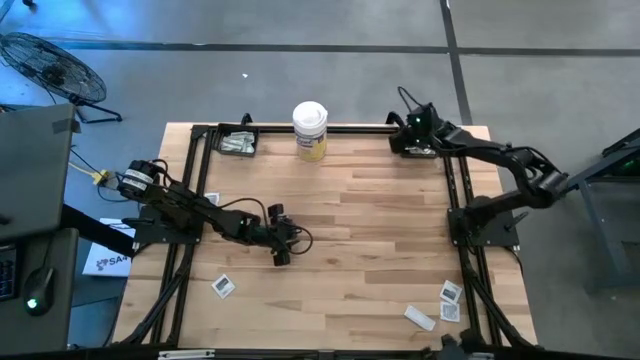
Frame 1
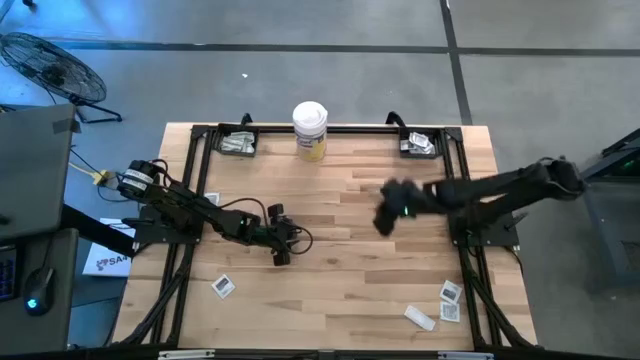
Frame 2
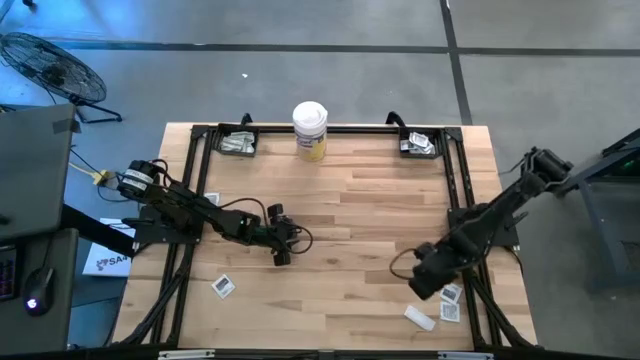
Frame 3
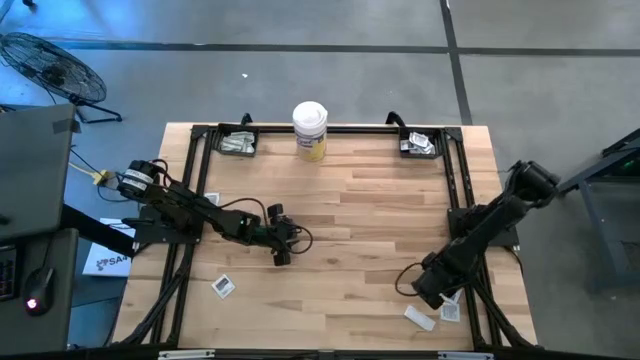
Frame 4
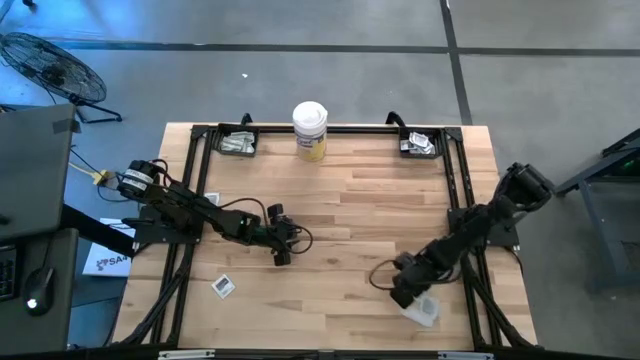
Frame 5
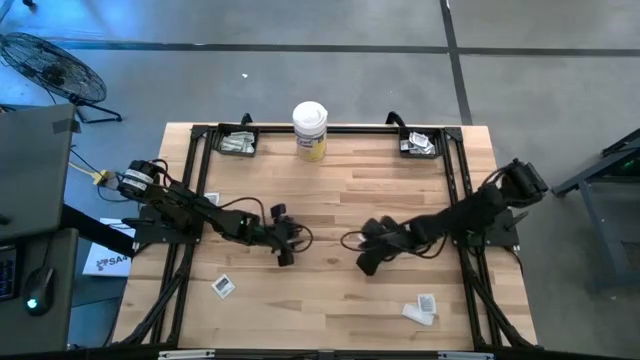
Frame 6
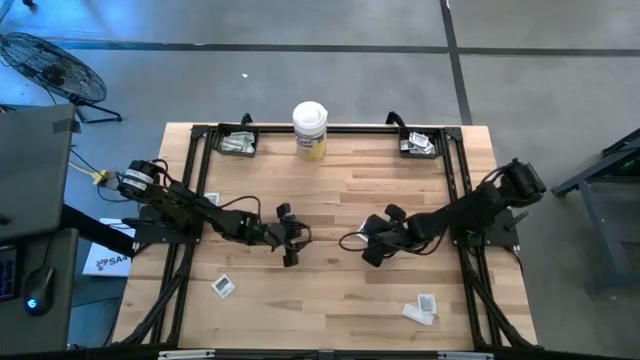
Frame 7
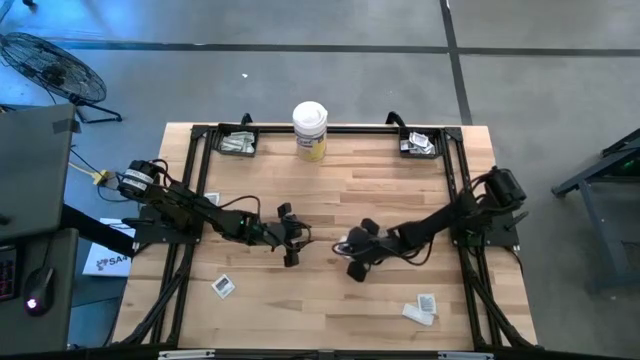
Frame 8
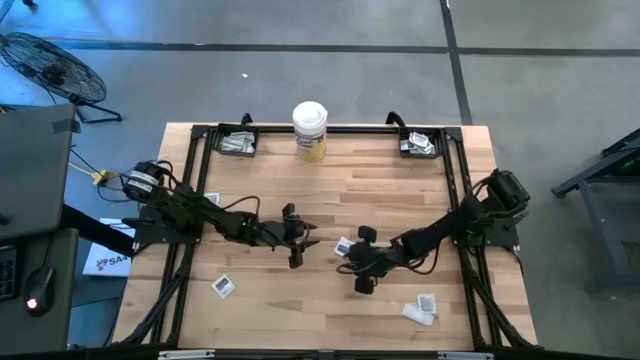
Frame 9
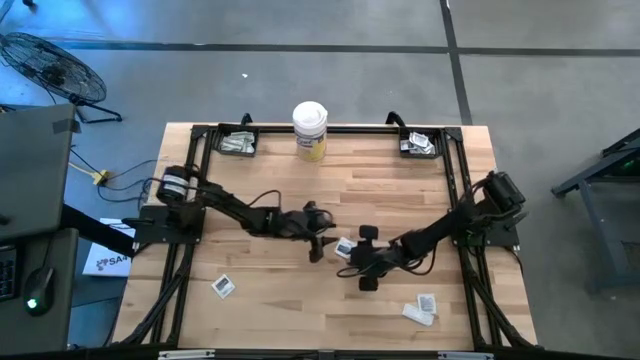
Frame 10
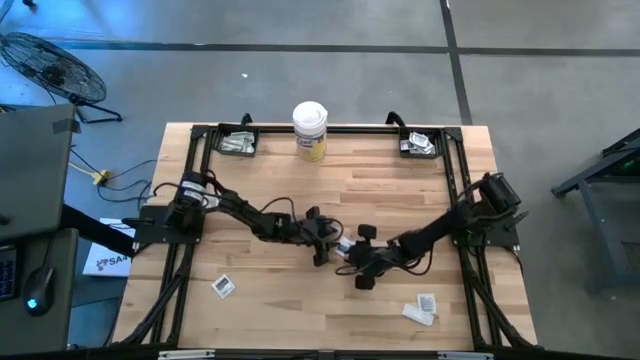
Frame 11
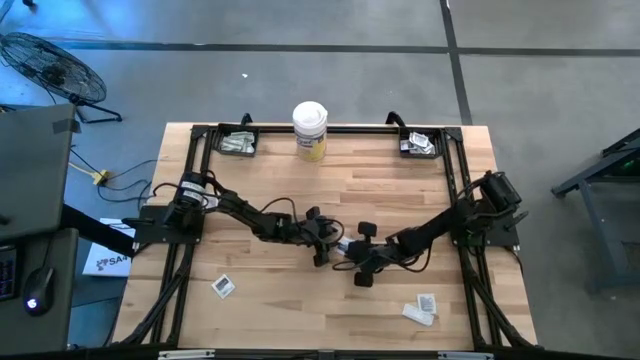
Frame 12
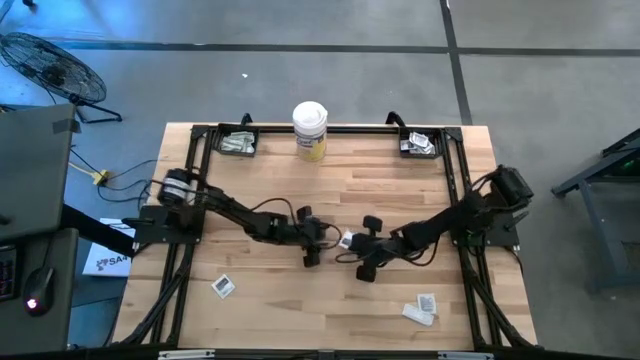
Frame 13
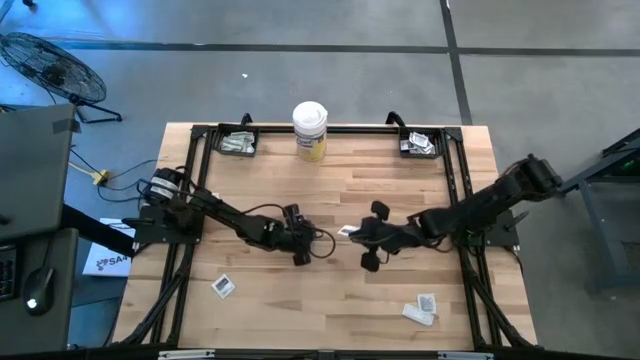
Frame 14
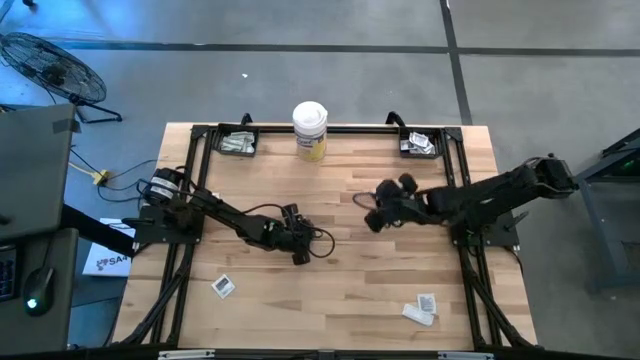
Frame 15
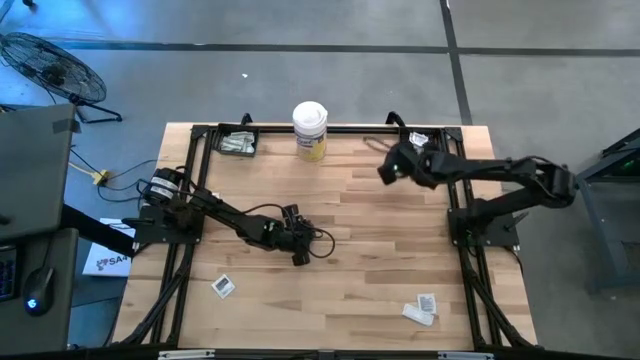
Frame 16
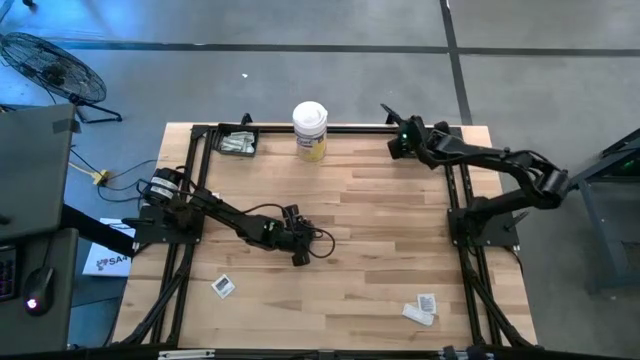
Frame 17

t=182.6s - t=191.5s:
Task: Pick & Place First Aid Supplies
Put the black towelette pack into the right black basket

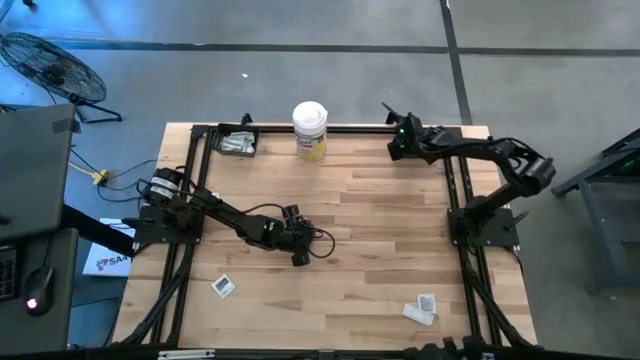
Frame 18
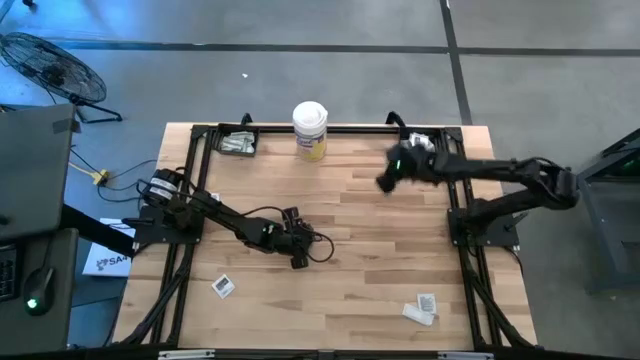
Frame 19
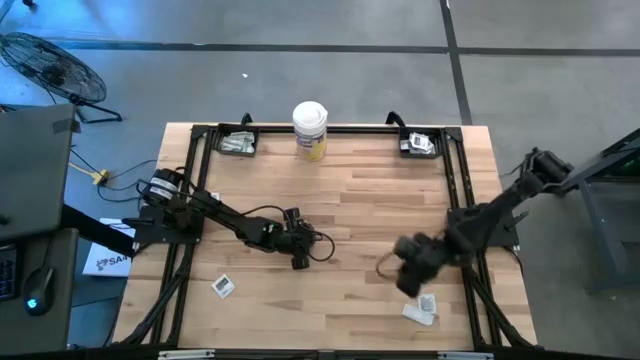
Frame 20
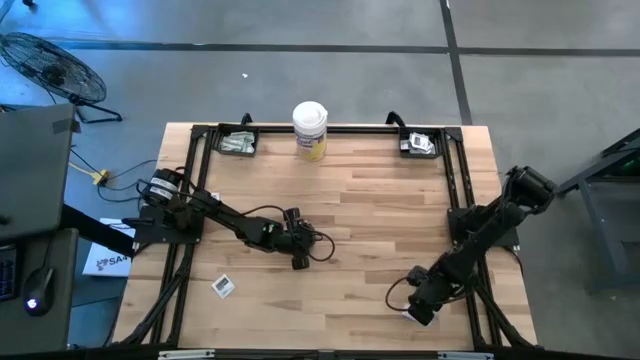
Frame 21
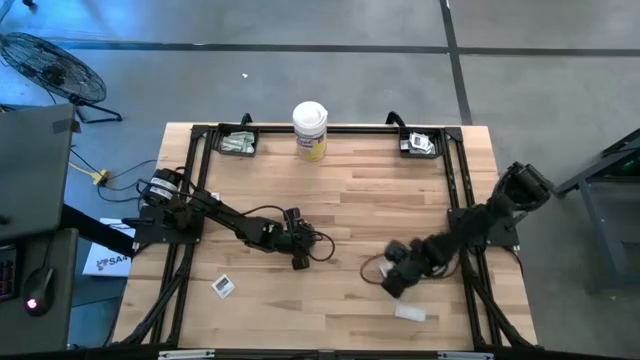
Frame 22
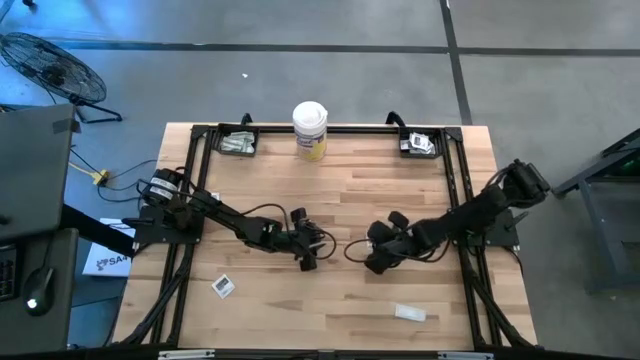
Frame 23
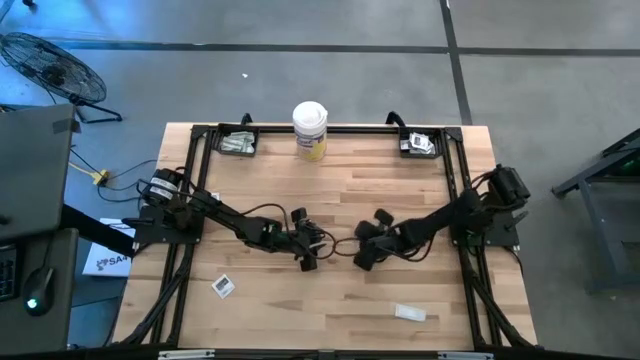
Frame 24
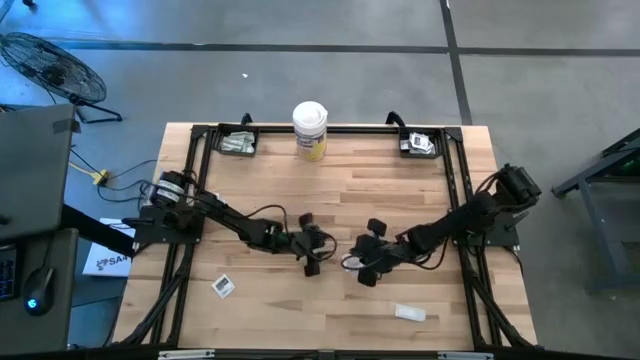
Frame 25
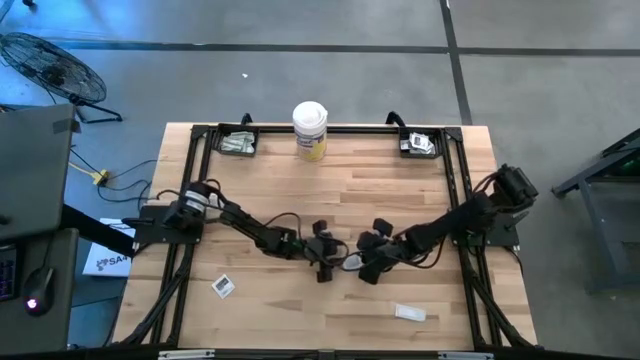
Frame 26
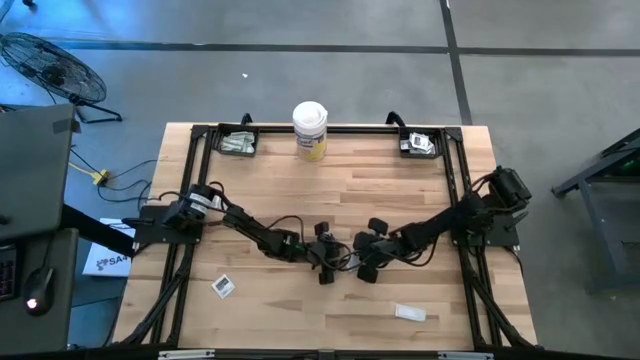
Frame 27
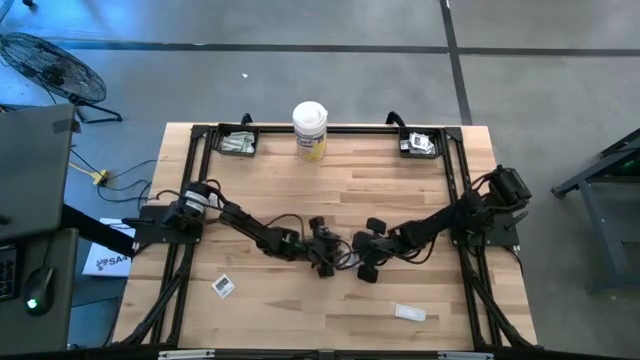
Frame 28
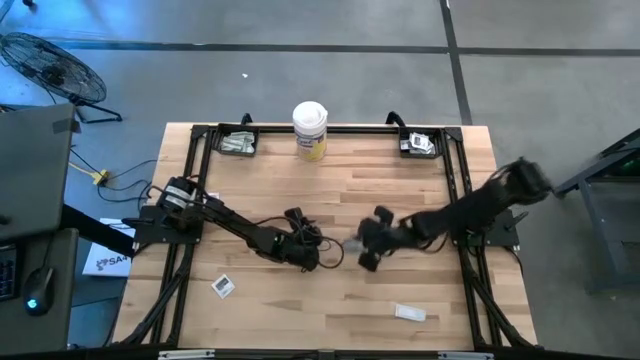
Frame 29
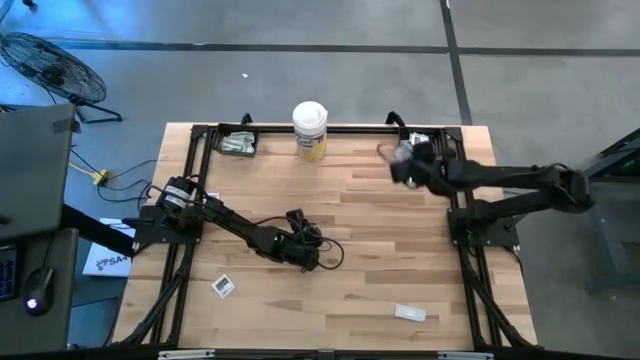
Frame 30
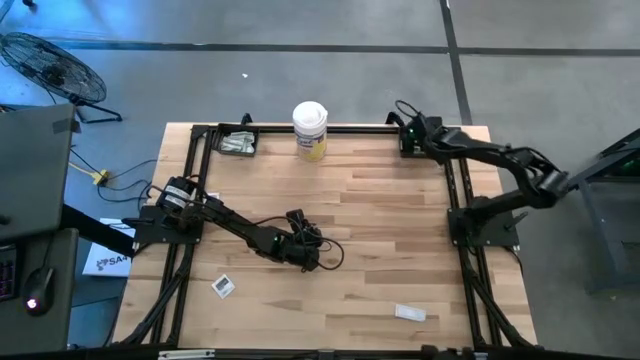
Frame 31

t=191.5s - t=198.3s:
Put the black towelette pack into the right black basket

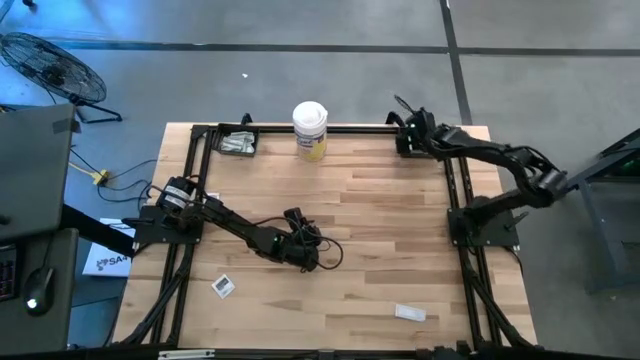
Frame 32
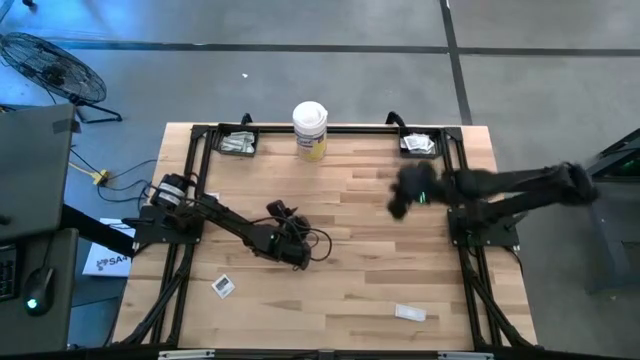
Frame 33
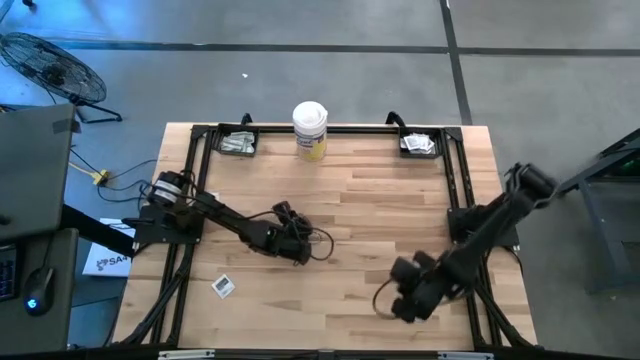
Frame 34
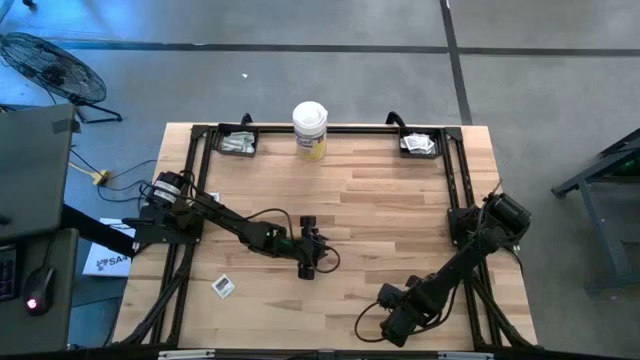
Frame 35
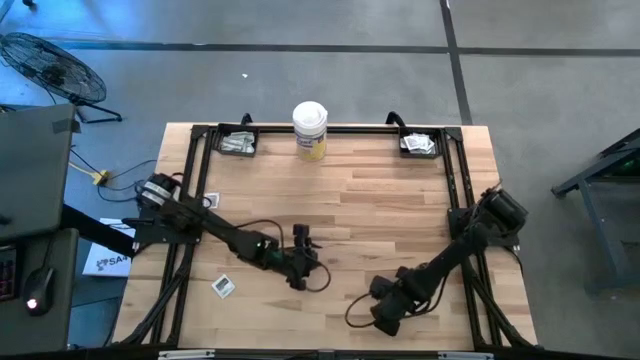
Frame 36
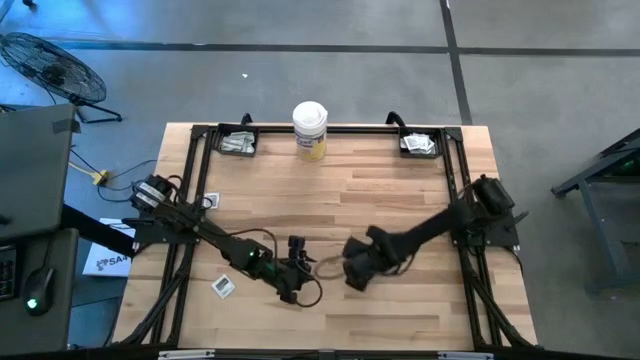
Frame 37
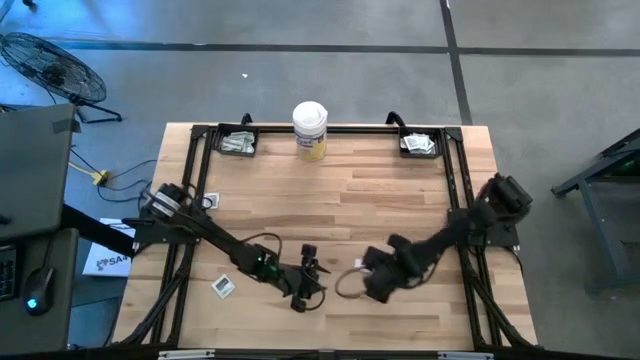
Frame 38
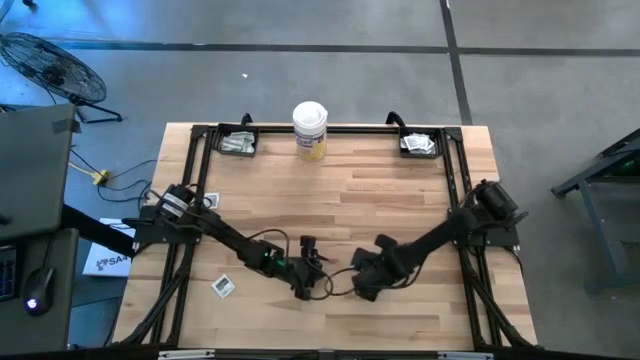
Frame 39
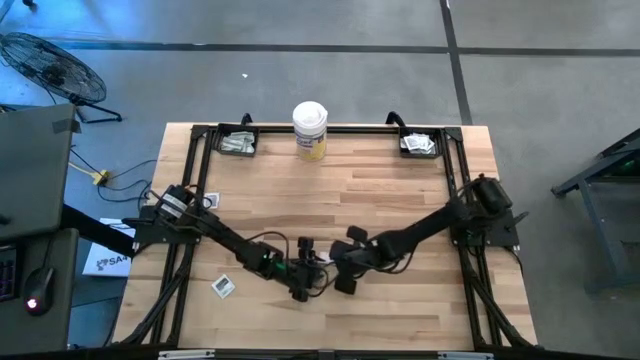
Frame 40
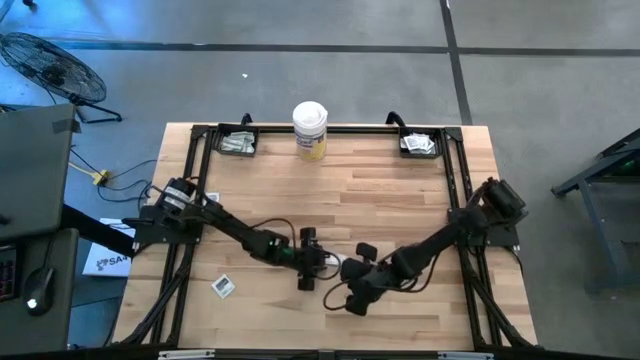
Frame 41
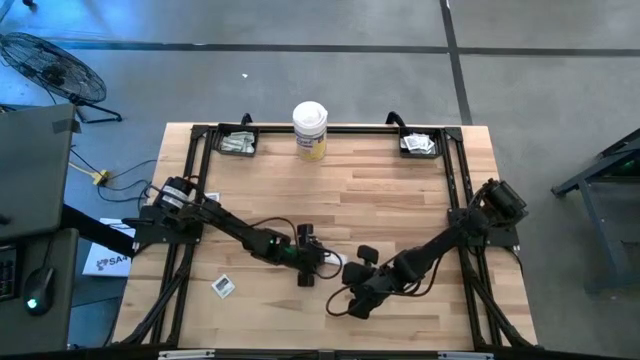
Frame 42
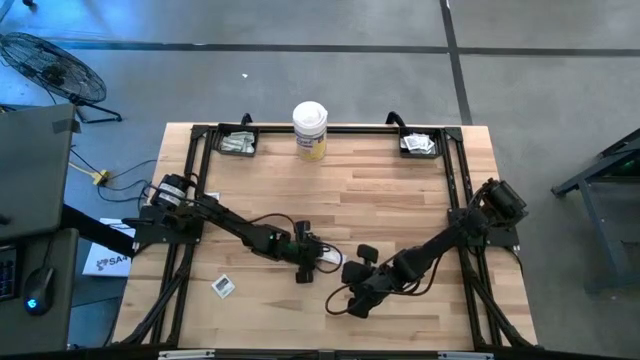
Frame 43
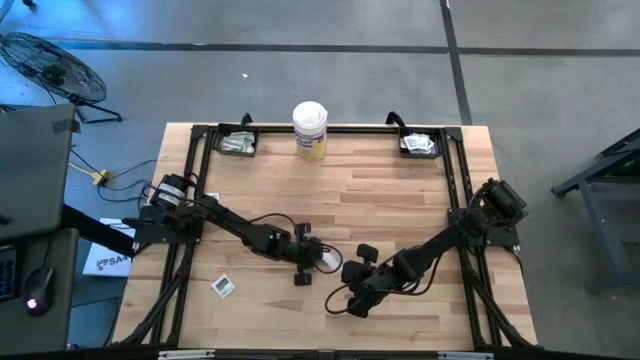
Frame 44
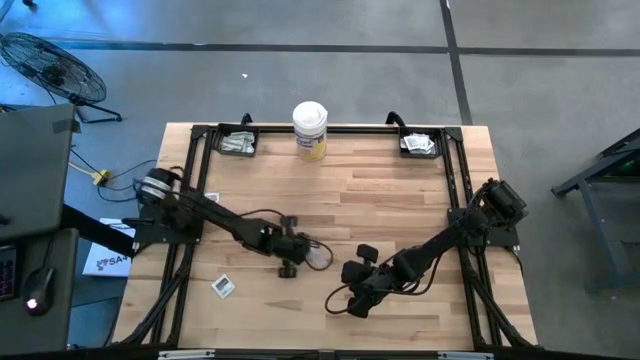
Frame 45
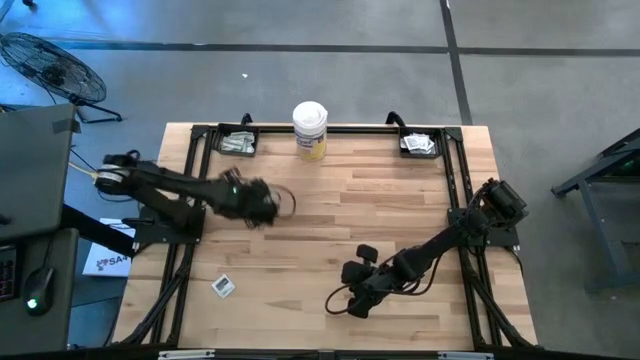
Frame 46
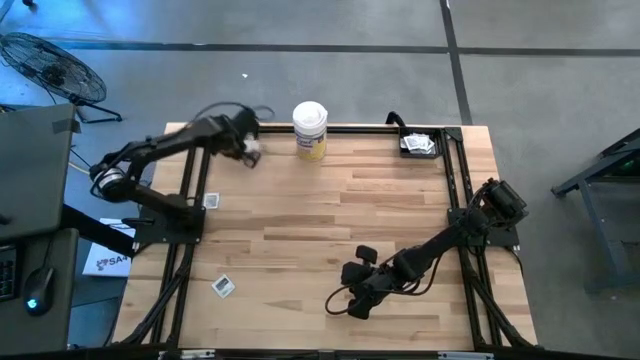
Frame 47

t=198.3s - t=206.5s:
Put the green bandage pack into the left black basket
